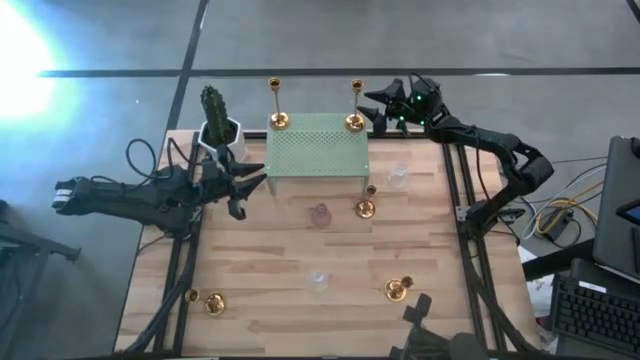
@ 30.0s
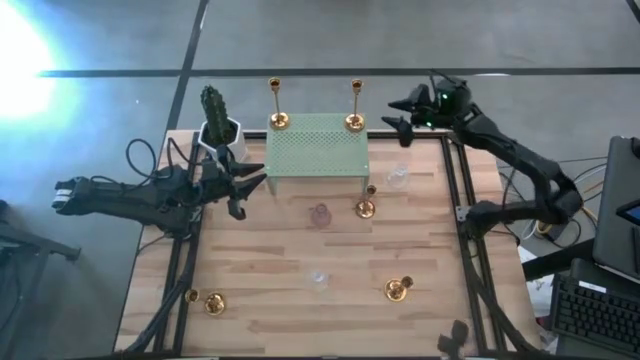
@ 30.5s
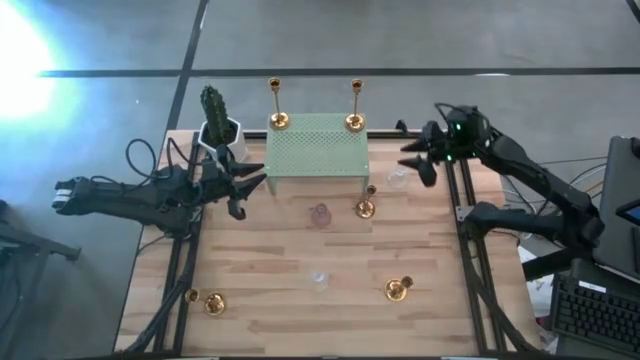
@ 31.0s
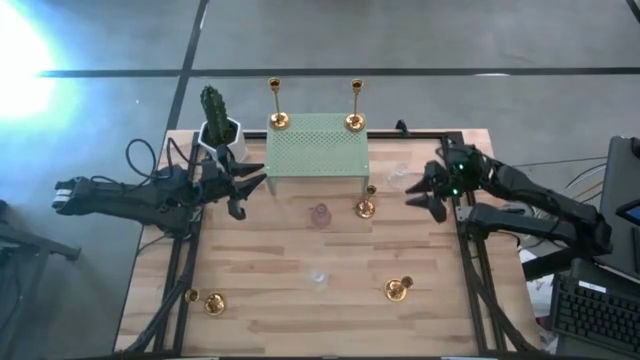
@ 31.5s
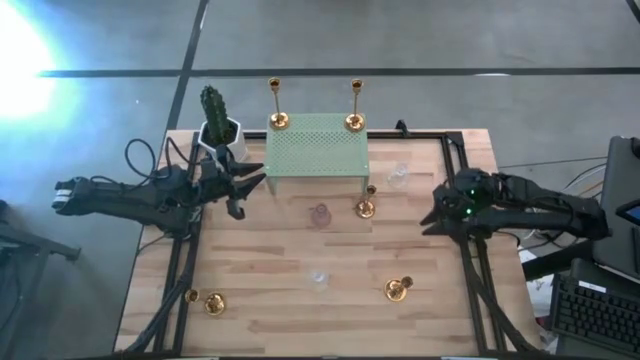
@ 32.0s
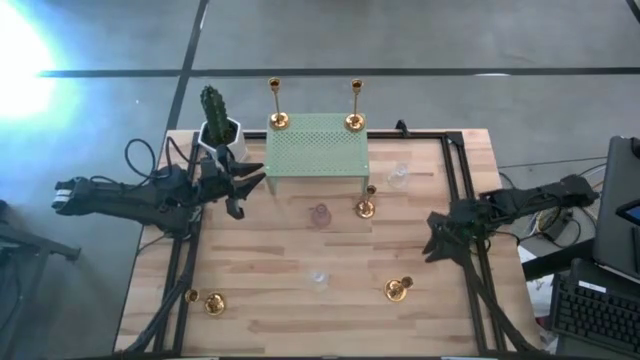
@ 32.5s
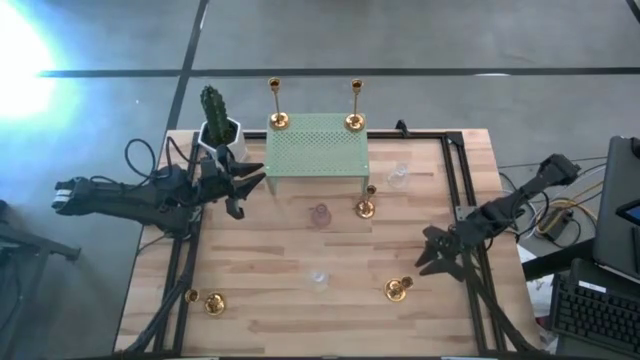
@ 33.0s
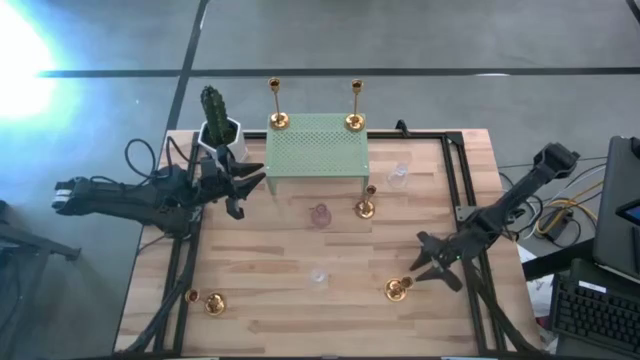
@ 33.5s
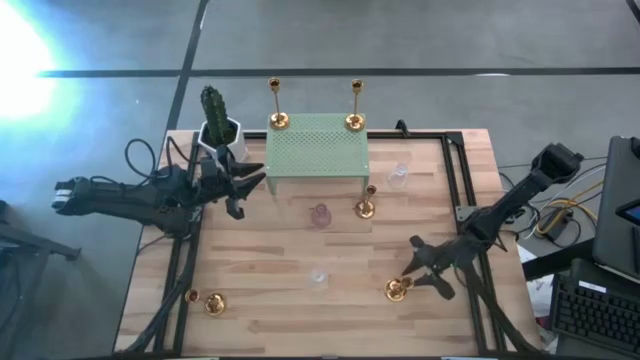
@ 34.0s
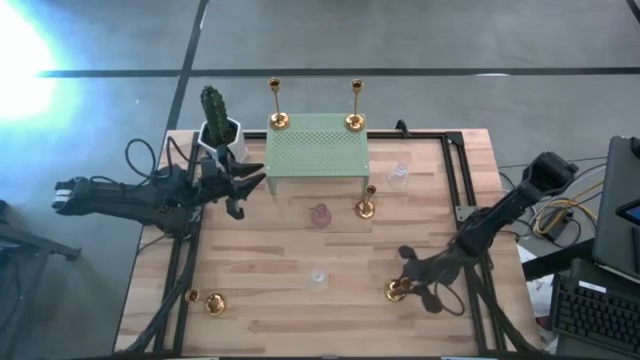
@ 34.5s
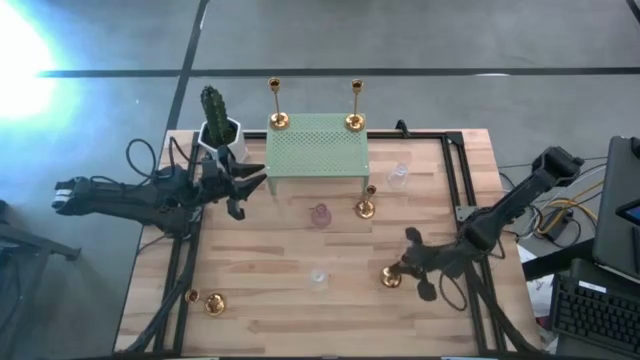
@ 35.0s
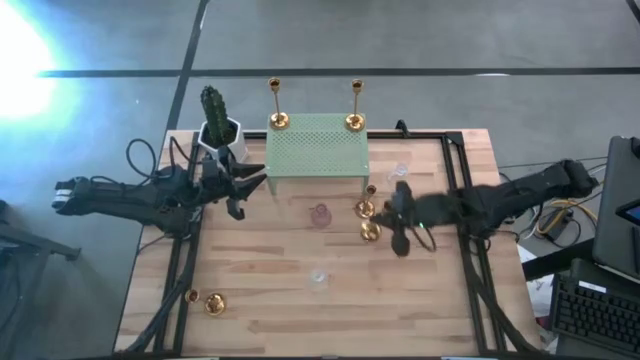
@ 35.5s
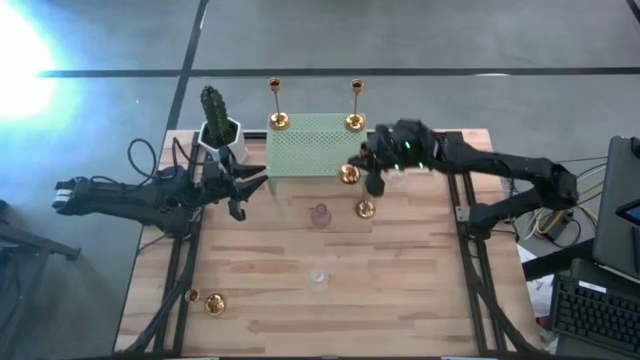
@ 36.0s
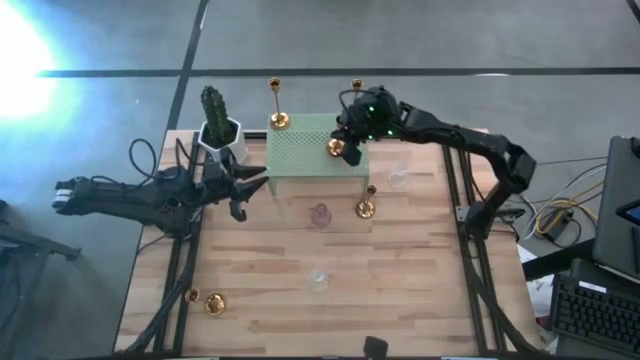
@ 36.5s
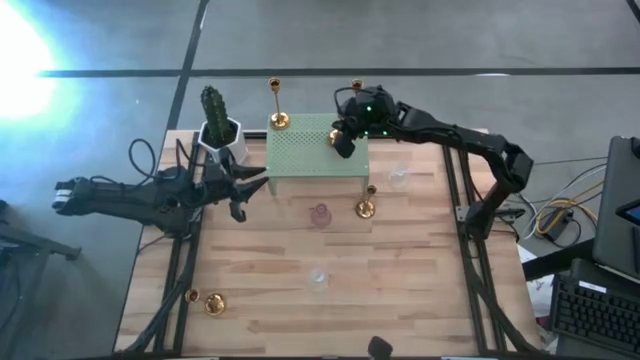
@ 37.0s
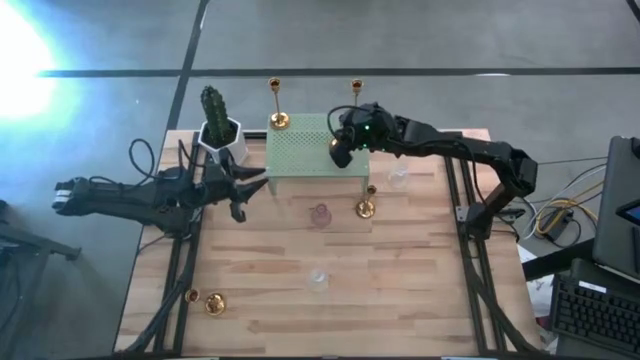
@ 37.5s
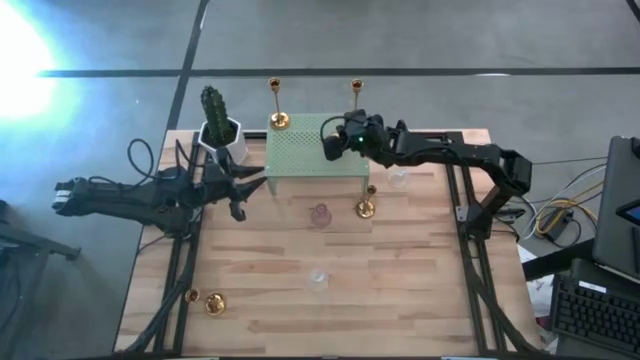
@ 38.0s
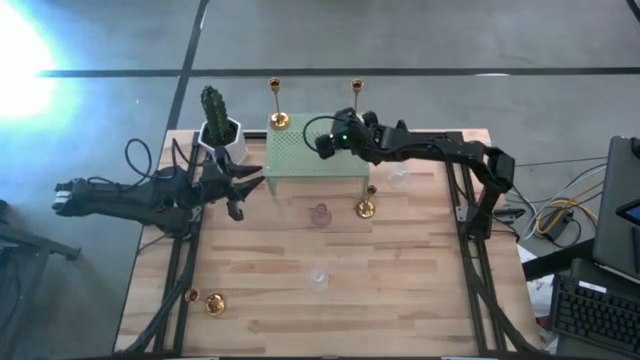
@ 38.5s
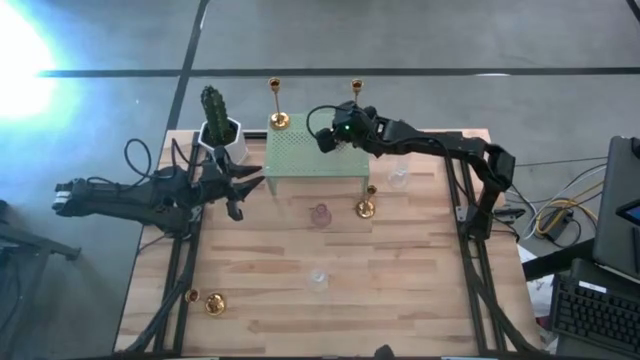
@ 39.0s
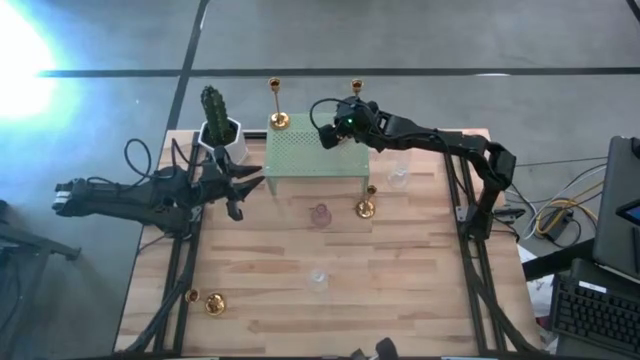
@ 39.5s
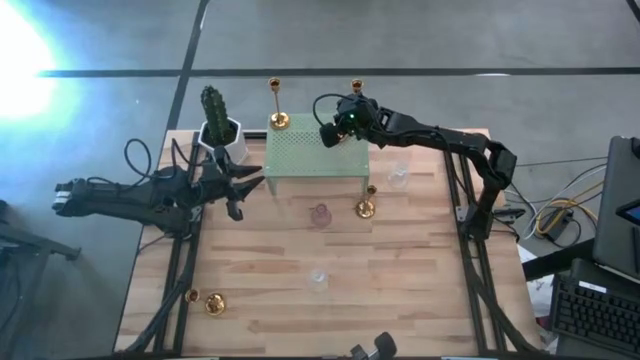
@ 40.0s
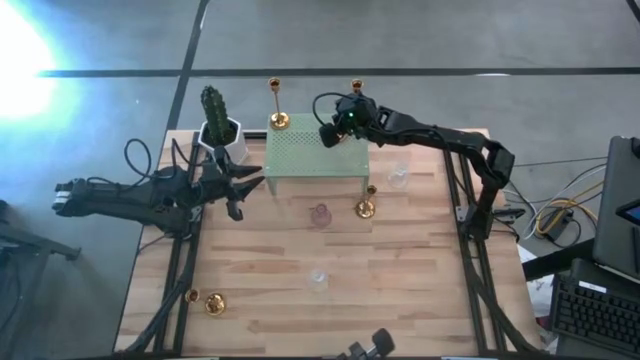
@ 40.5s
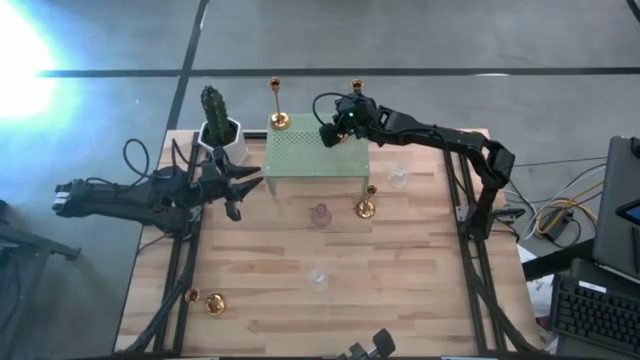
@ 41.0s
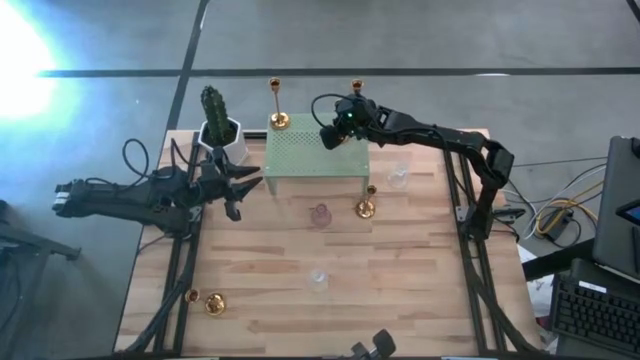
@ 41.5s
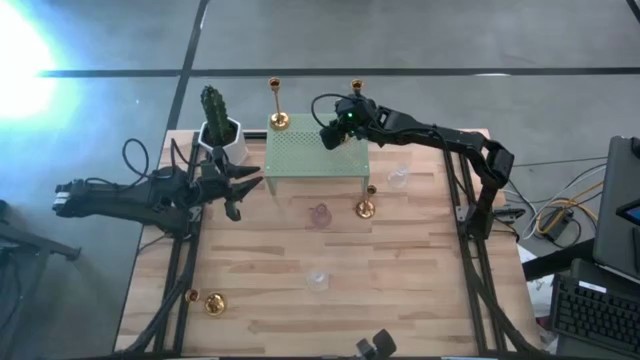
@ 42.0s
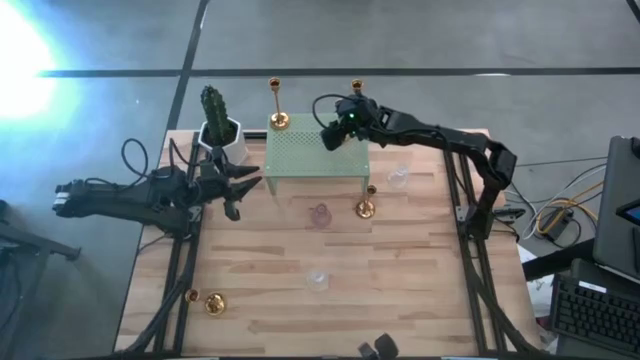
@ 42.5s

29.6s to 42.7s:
Task: Pick & Place candle stick holders
Put the gold candle holder on the shelf

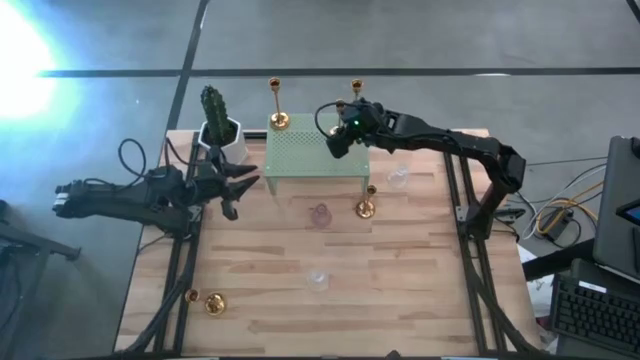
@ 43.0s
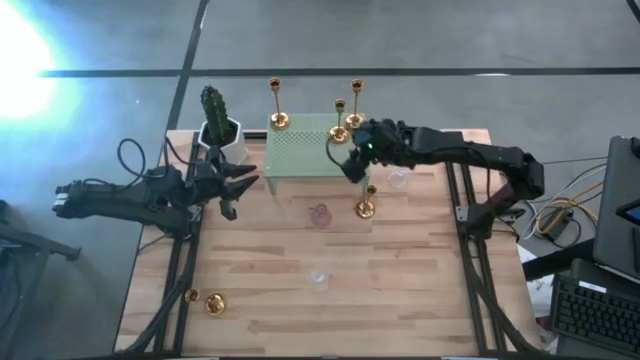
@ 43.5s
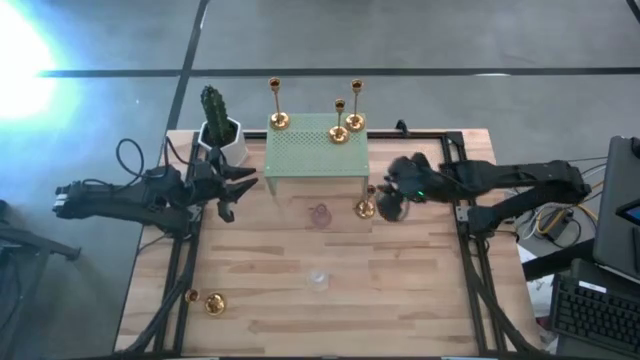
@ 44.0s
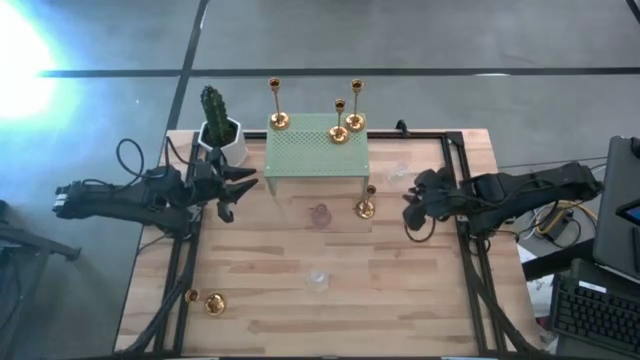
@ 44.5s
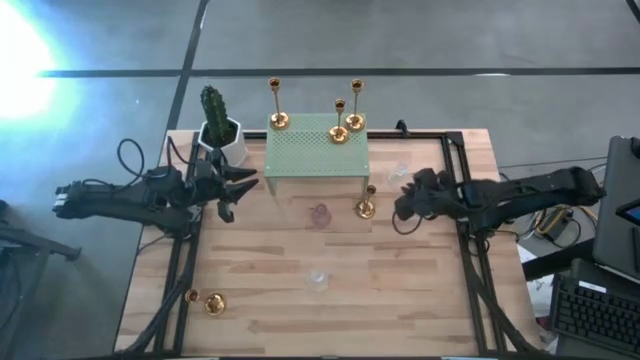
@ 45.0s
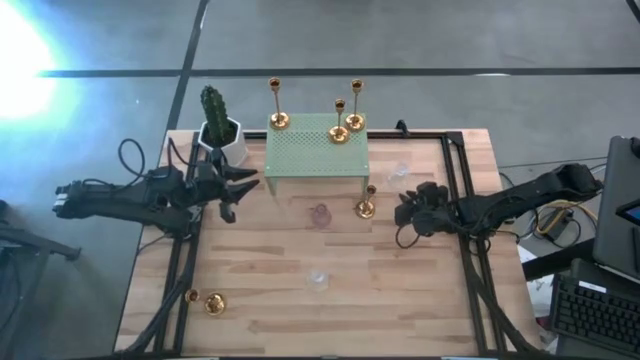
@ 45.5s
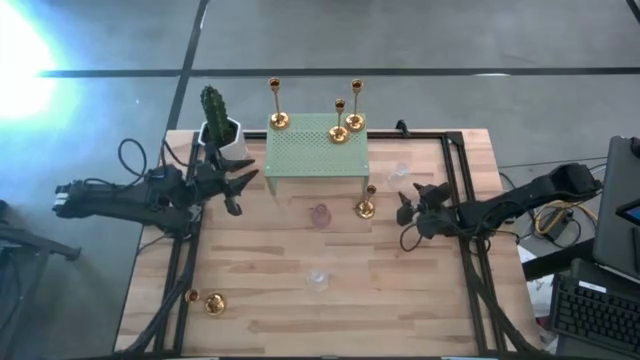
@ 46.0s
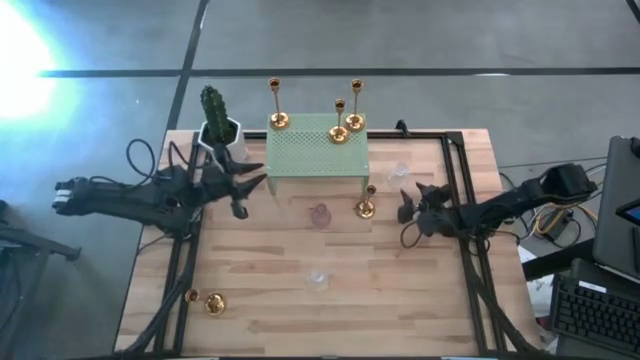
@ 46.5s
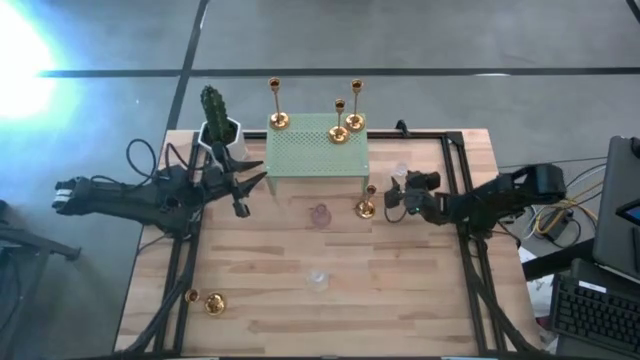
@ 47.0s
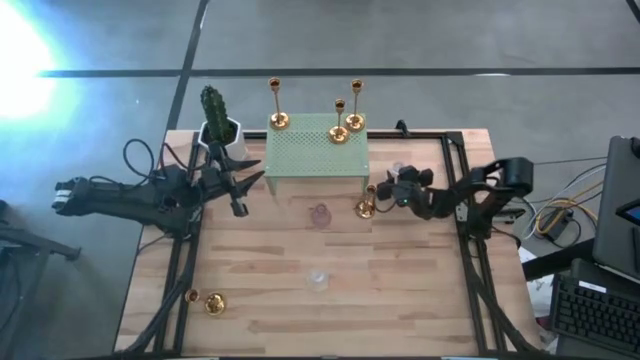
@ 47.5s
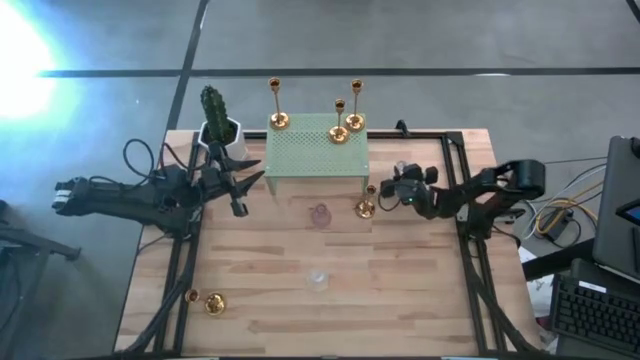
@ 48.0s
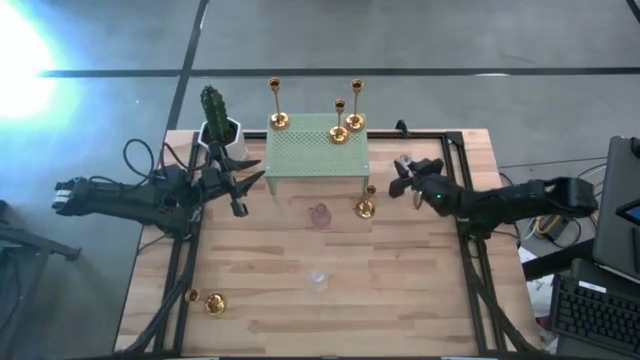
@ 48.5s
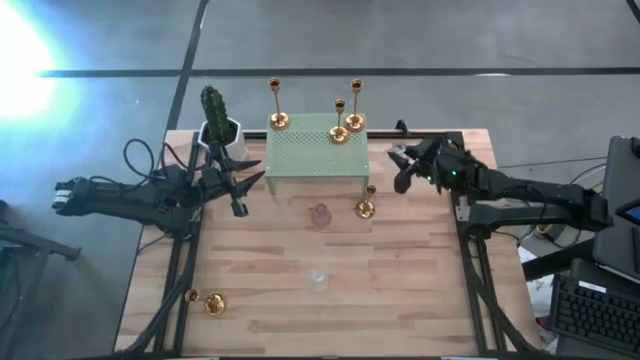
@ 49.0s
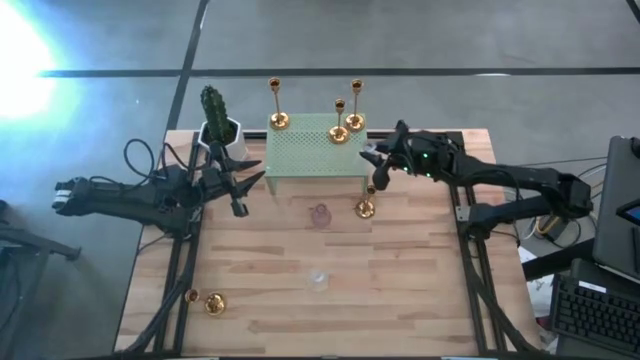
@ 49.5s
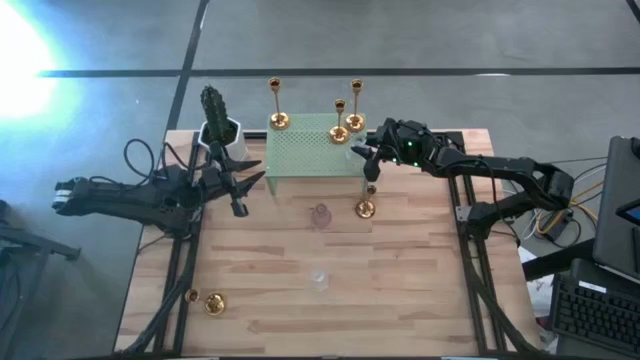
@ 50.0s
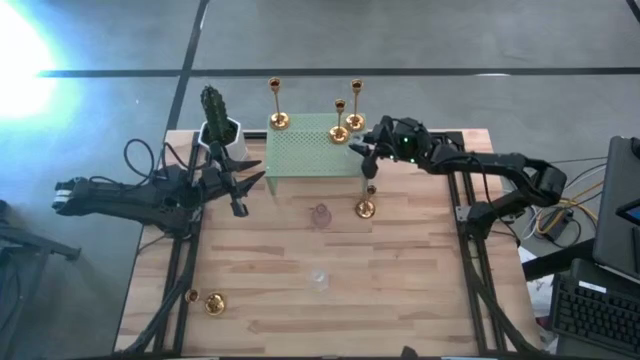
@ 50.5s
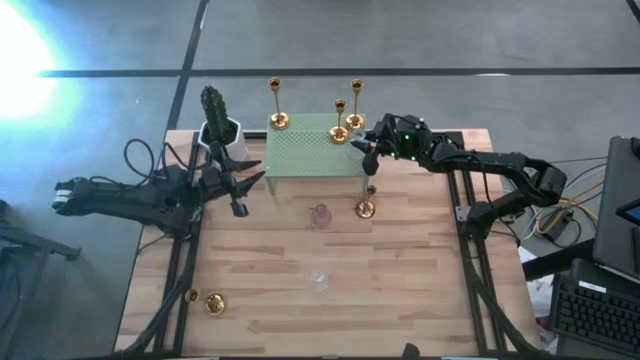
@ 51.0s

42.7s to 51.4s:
Put the transparent candle holder on the shelf
